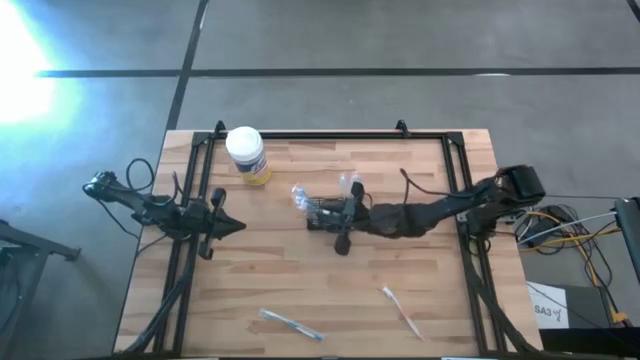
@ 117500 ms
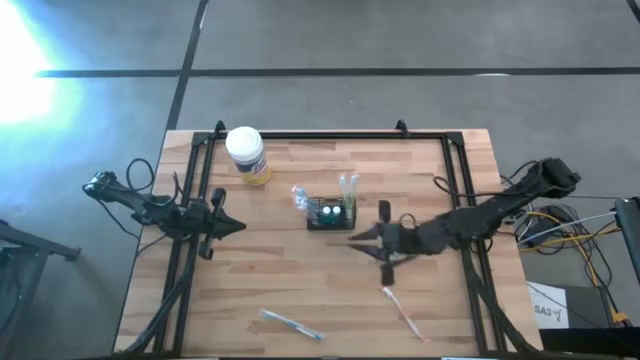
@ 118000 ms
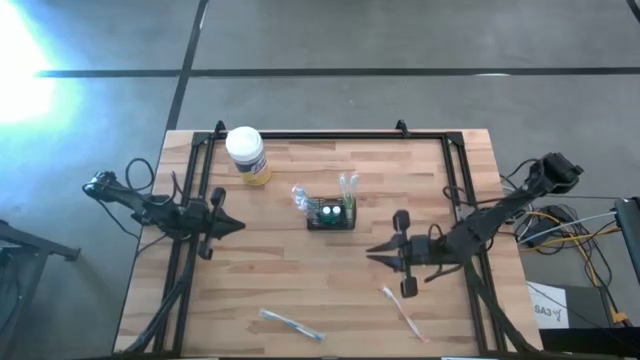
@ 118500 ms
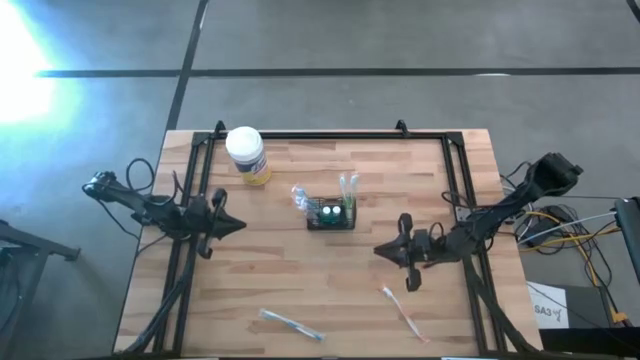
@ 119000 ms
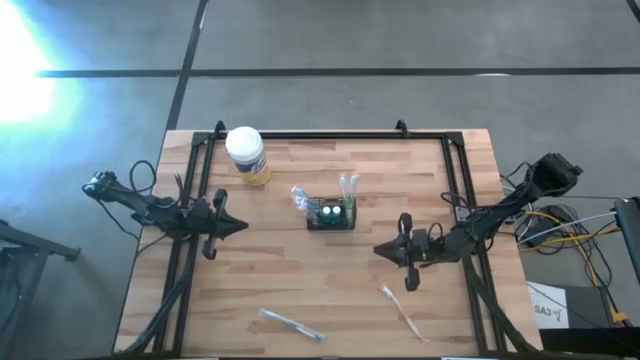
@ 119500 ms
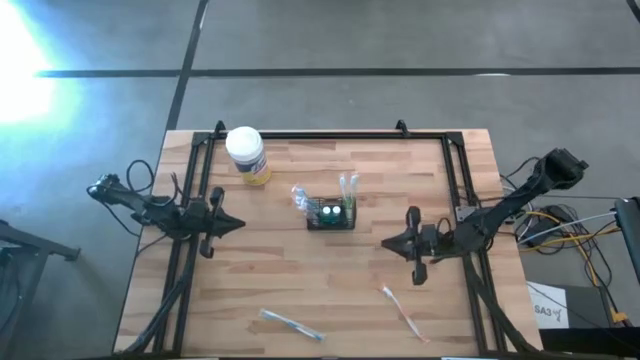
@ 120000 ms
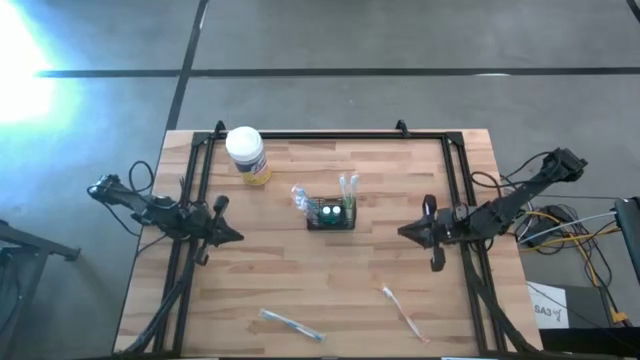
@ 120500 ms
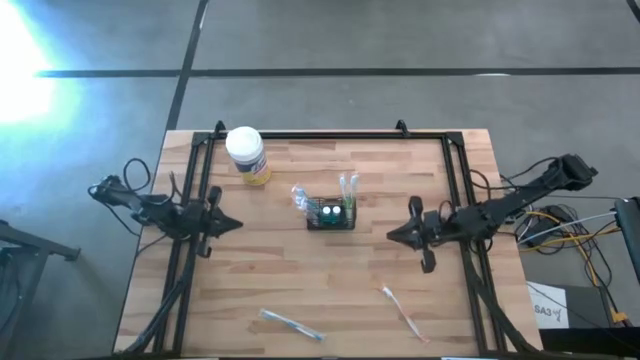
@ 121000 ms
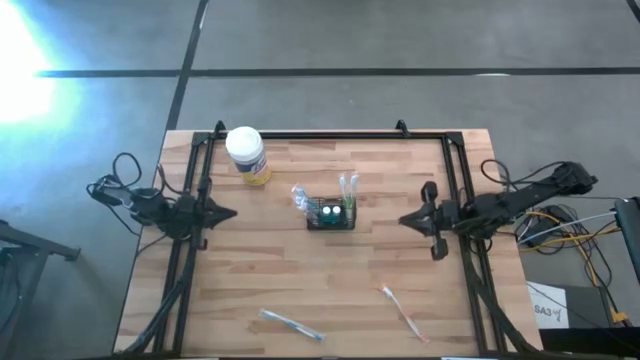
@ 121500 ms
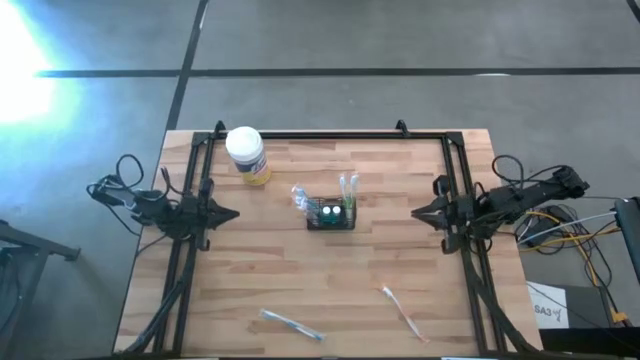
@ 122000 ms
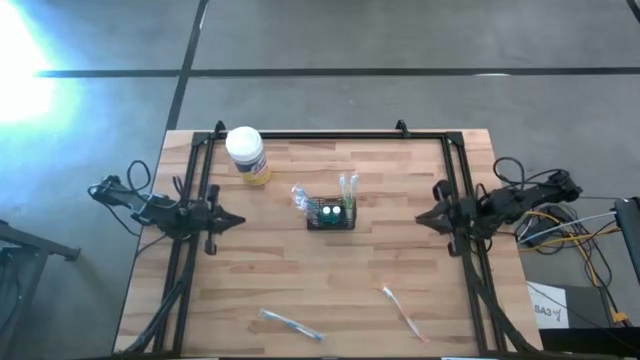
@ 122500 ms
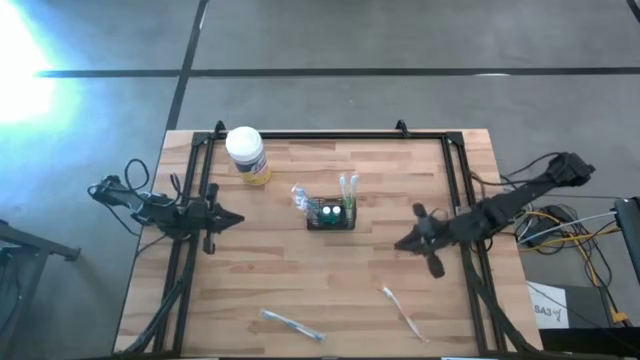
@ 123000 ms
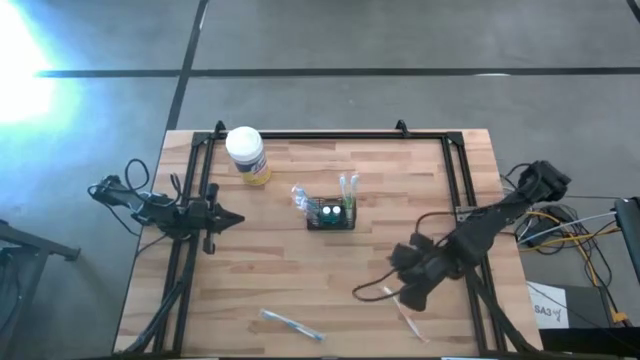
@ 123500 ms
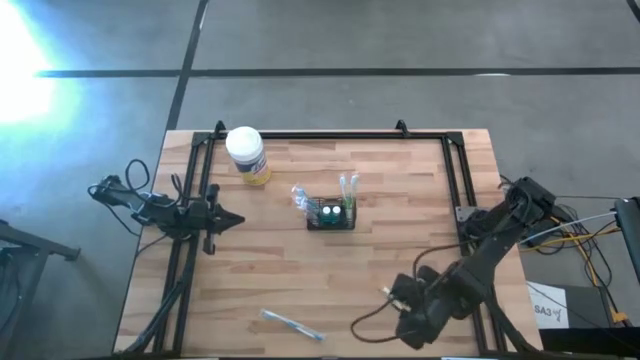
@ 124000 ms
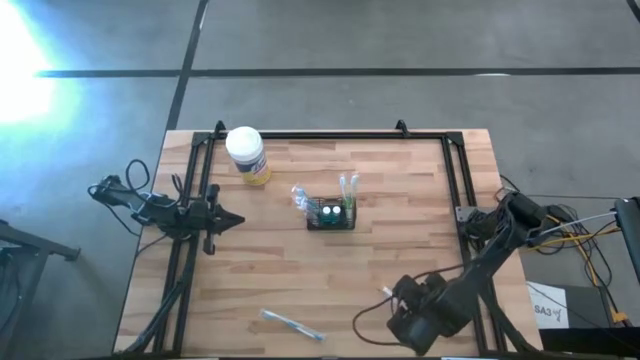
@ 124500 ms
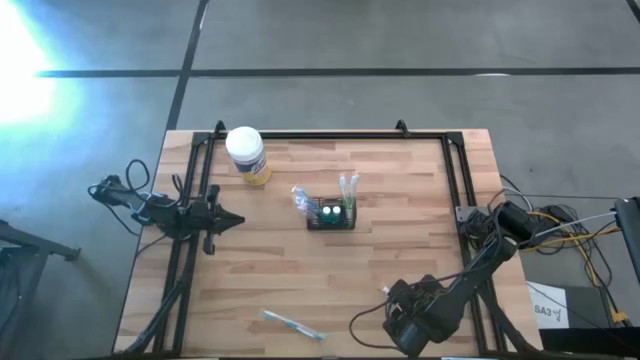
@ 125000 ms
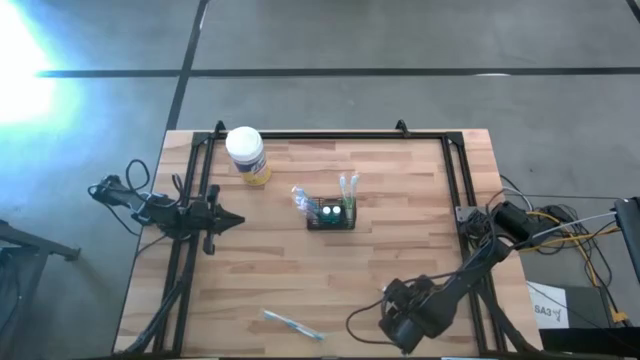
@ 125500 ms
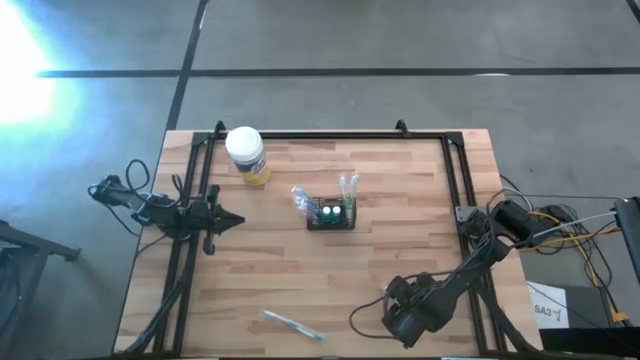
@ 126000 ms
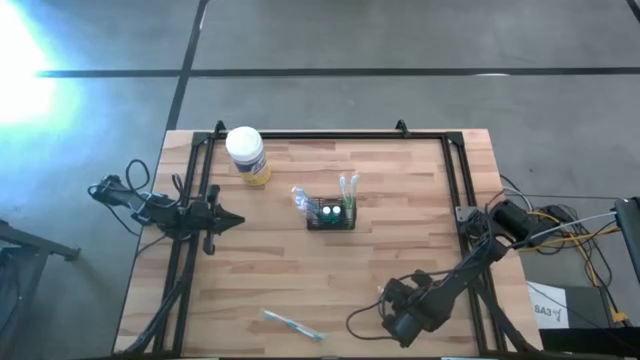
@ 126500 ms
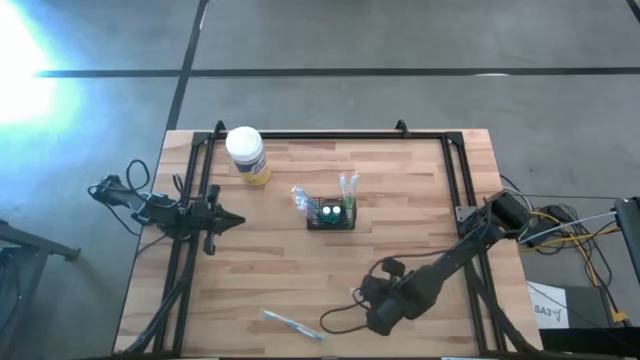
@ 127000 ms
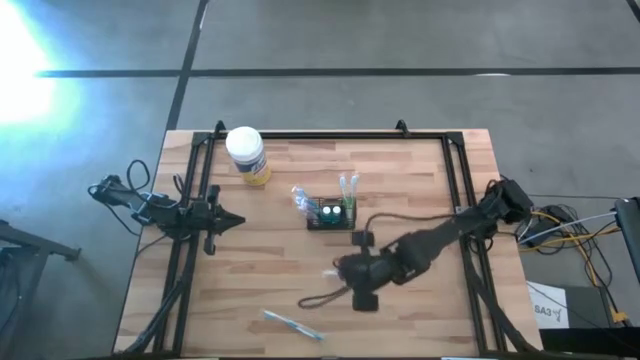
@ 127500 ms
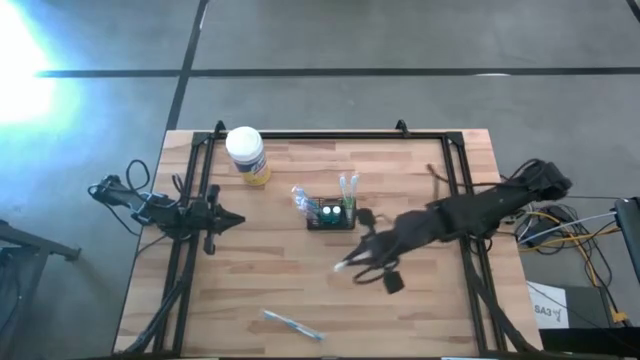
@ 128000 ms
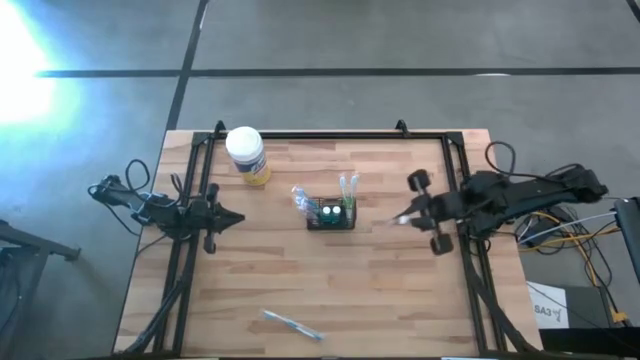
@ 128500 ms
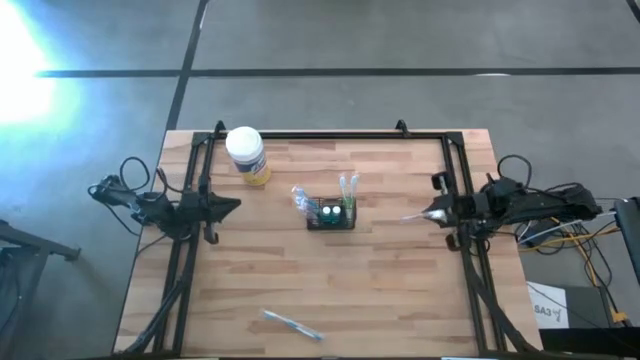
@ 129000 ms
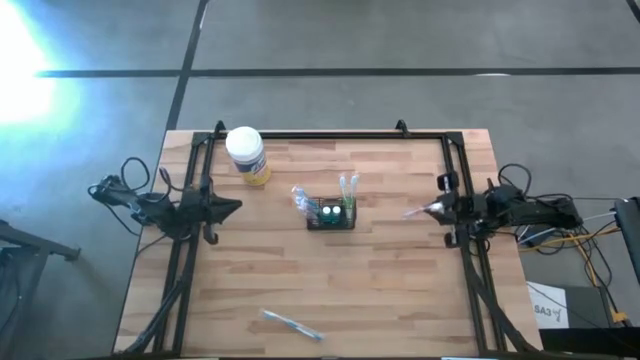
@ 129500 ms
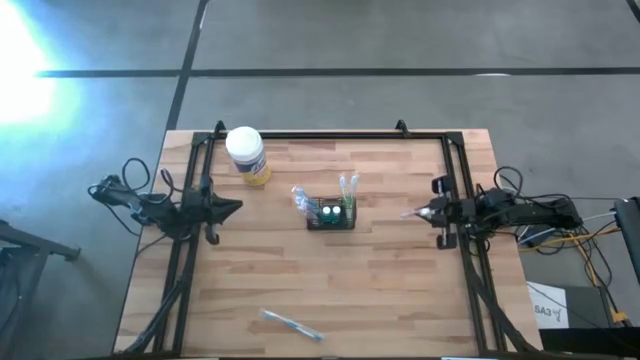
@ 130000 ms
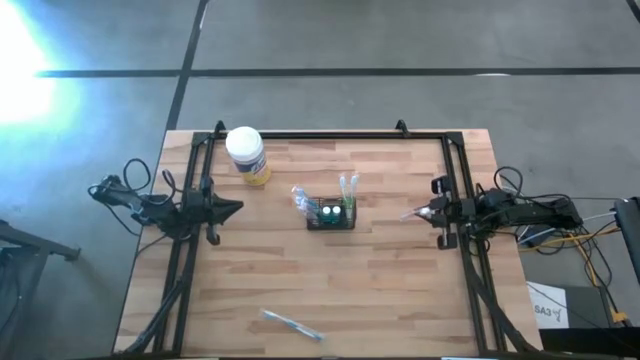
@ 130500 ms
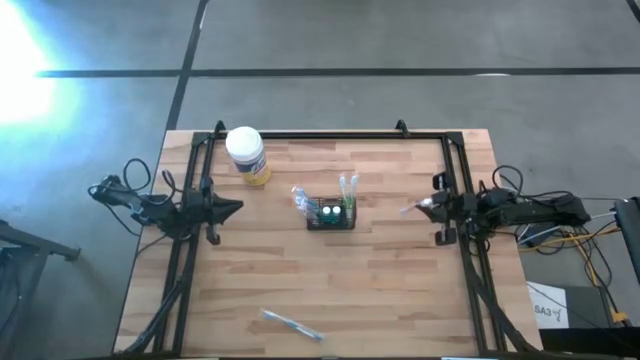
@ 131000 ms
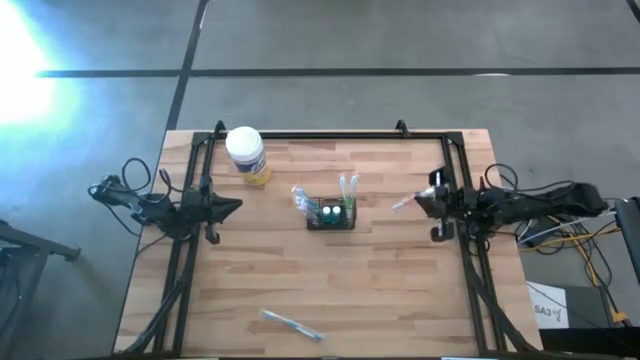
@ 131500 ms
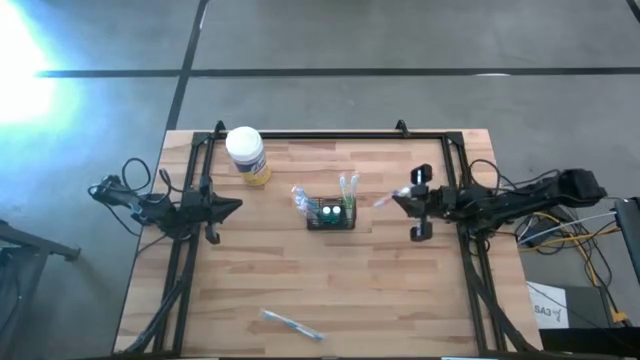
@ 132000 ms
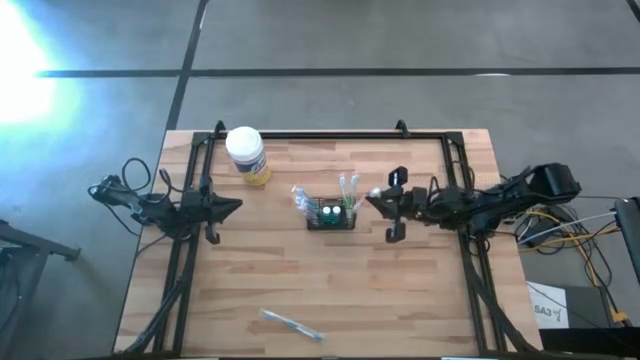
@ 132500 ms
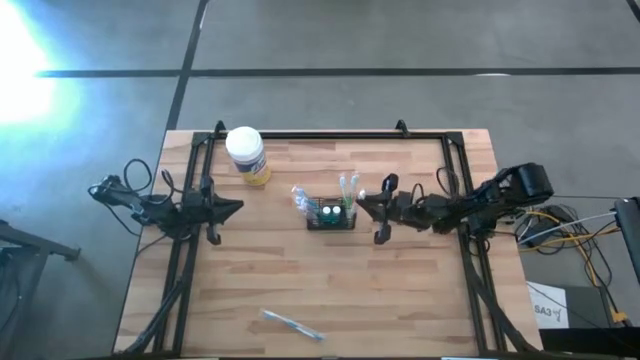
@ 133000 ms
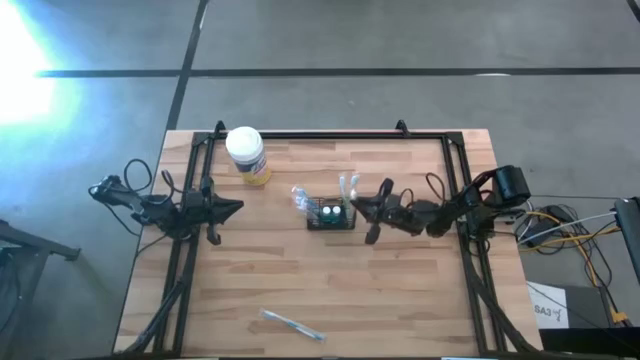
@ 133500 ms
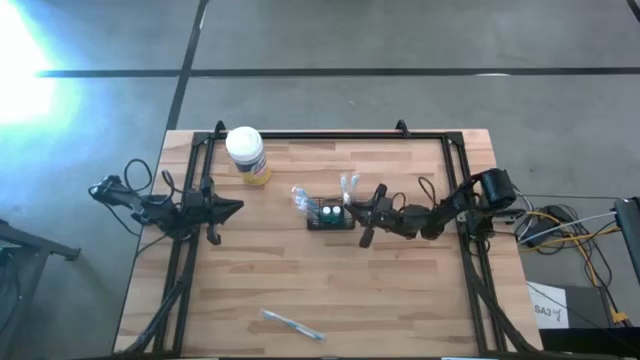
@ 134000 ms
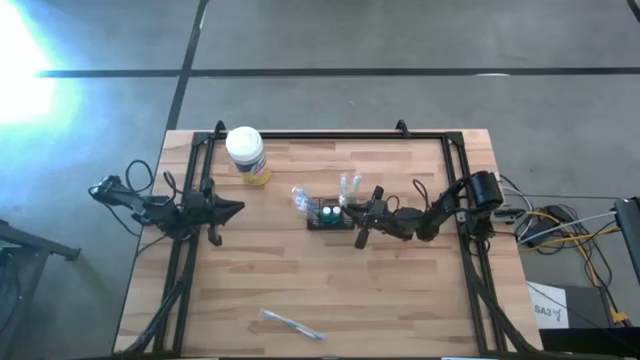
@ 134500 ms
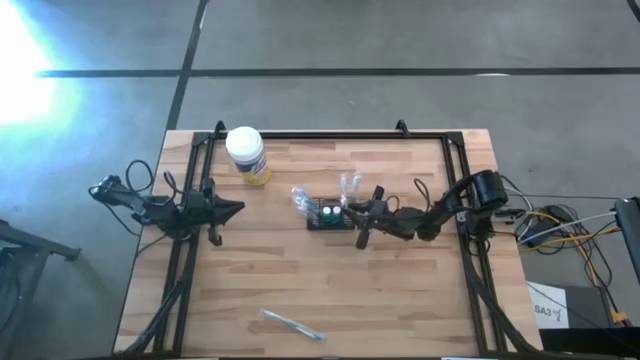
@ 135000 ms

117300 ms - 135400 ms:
Task: Pick & Place toothbrushing station
Put the orange toothbrush into the black mesh organizer

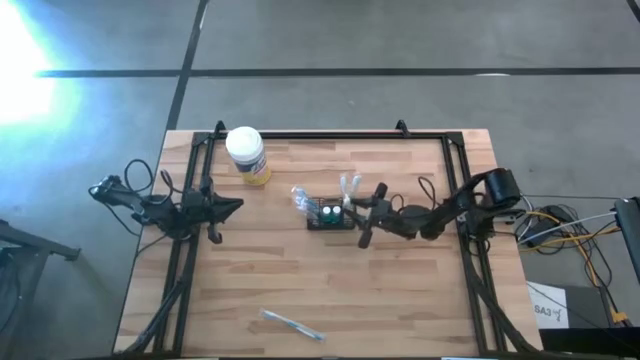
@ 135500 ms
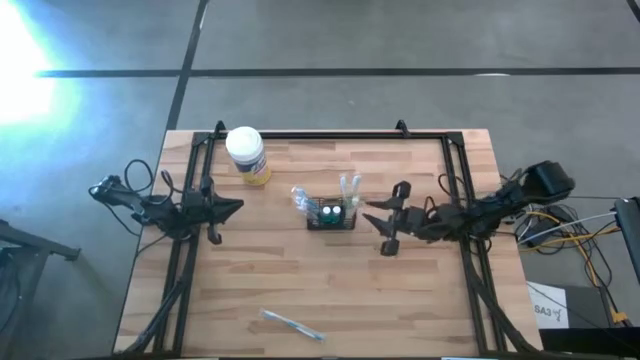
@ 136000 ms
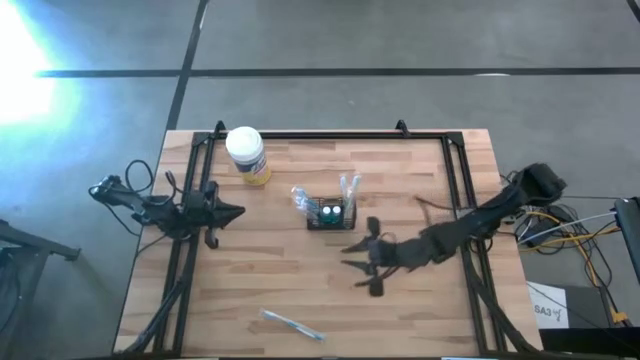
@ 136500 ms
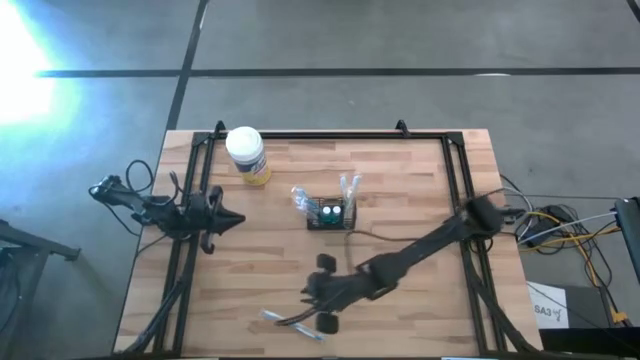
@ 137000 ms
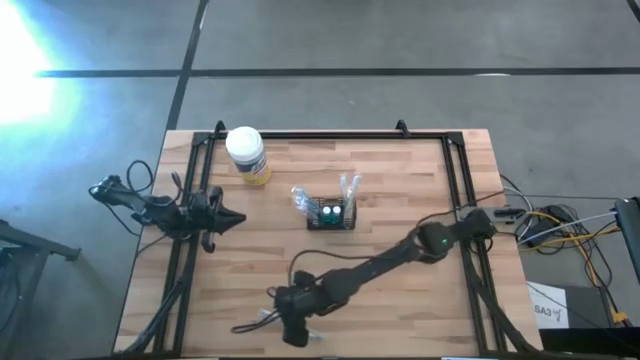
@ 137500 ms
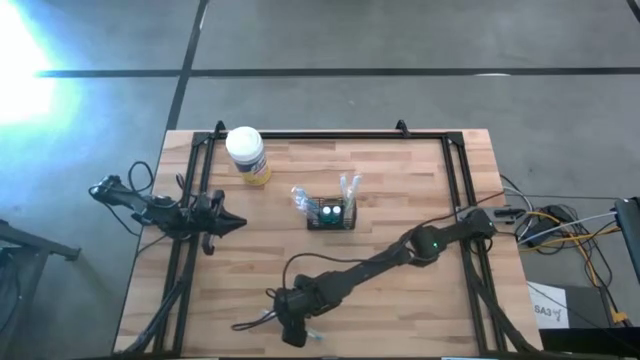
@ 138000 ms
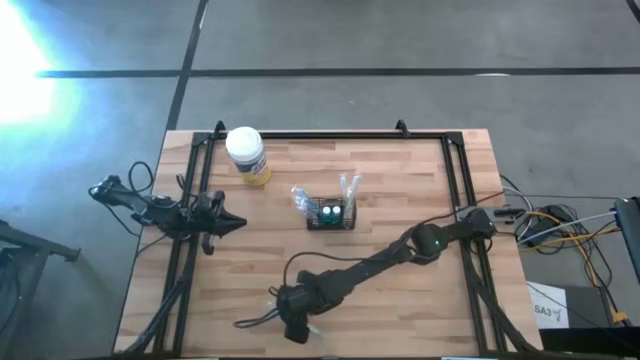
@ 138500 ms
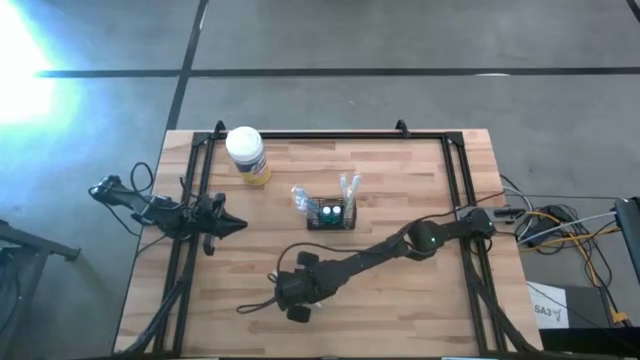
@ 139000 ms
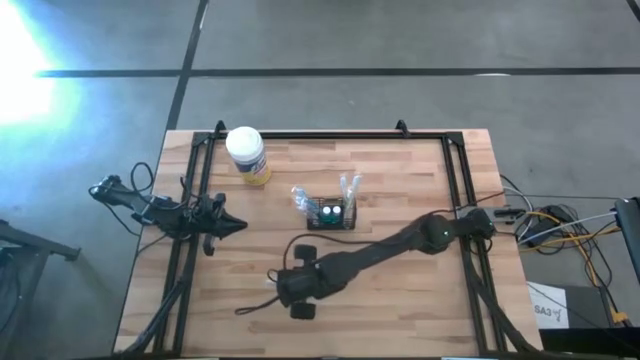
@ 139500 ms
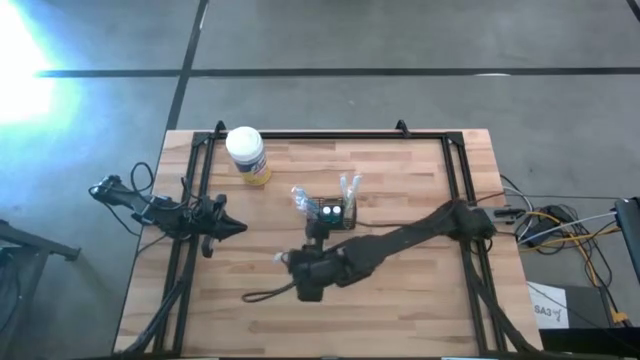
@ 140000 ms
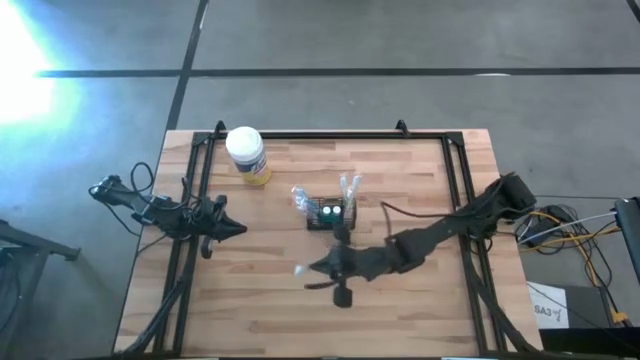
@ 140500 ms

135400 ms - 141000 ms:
Put the blue toothbrush into the black mesh organizer
